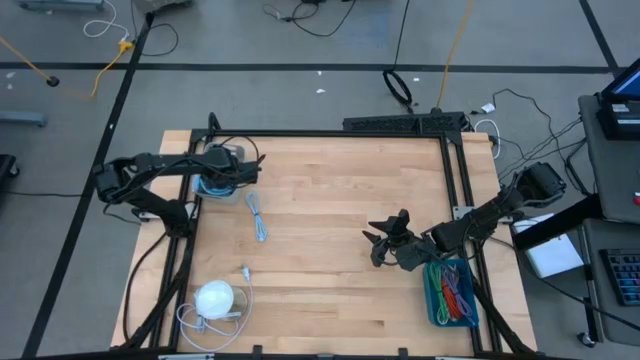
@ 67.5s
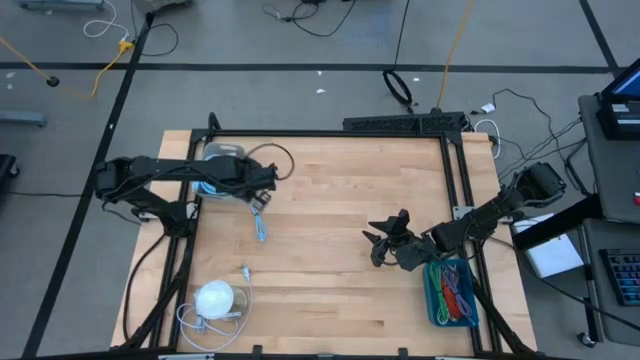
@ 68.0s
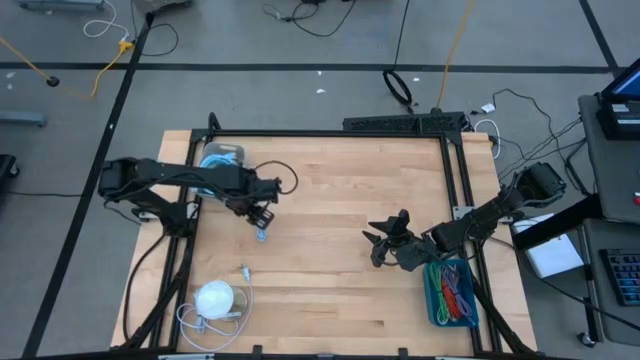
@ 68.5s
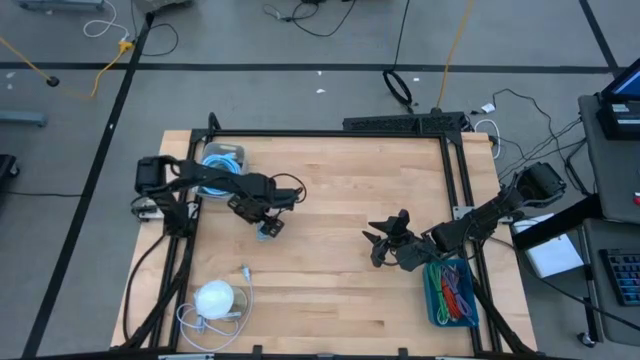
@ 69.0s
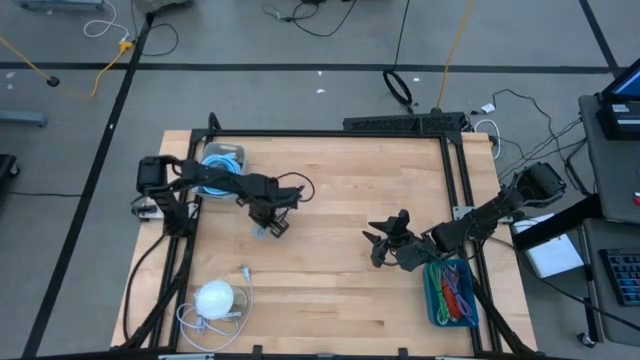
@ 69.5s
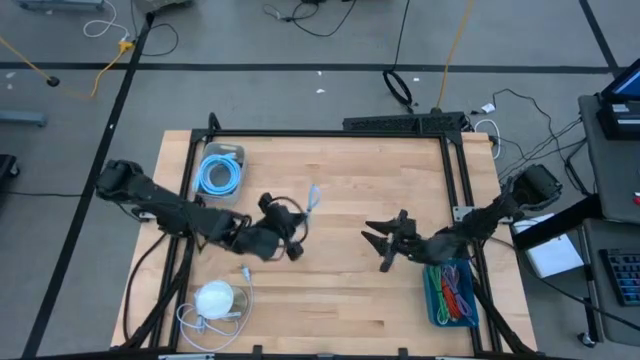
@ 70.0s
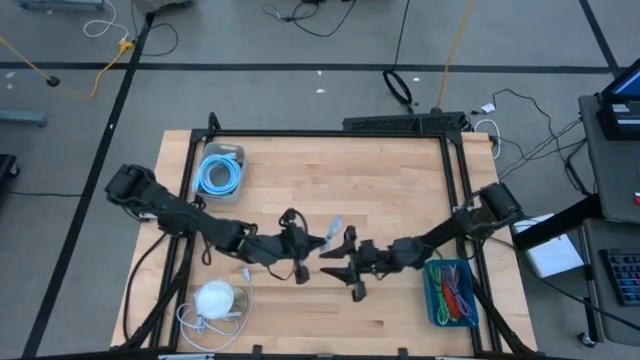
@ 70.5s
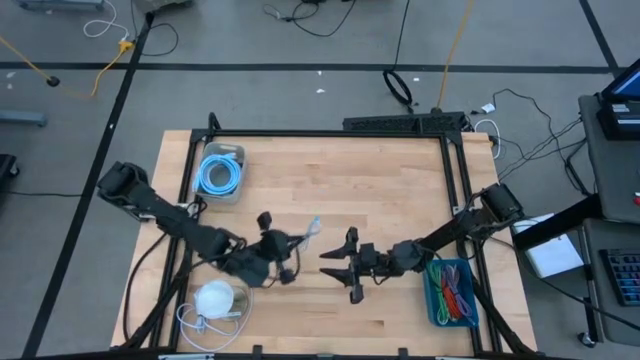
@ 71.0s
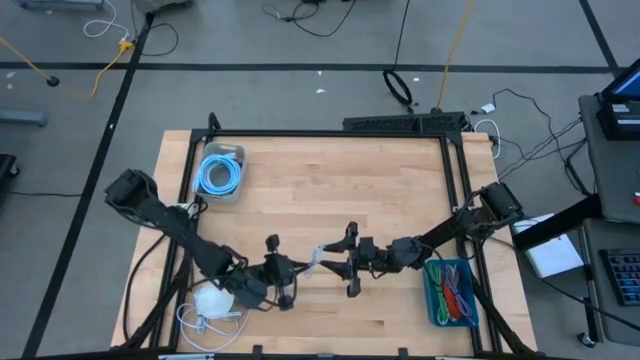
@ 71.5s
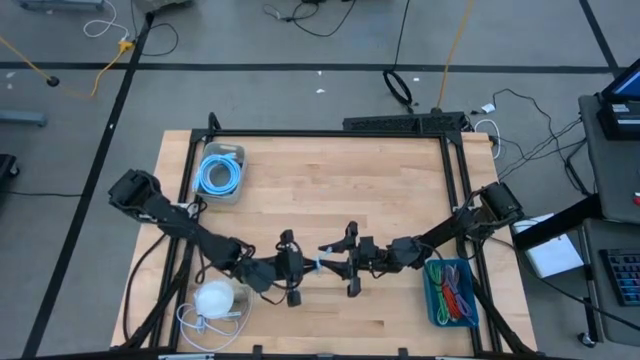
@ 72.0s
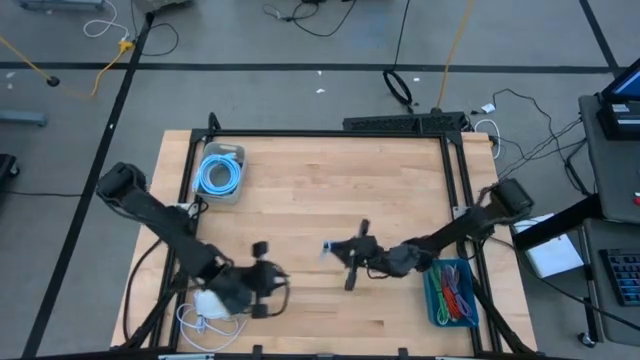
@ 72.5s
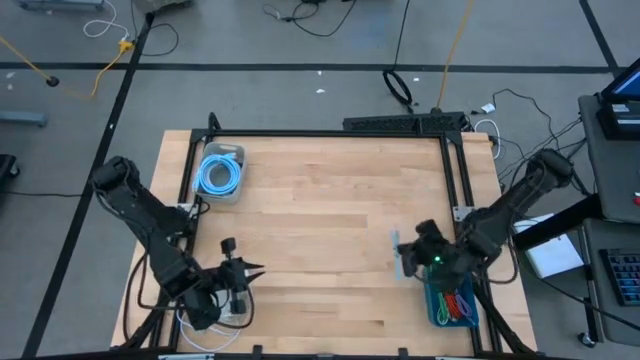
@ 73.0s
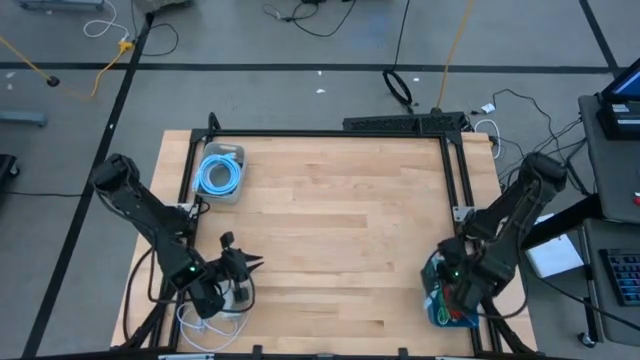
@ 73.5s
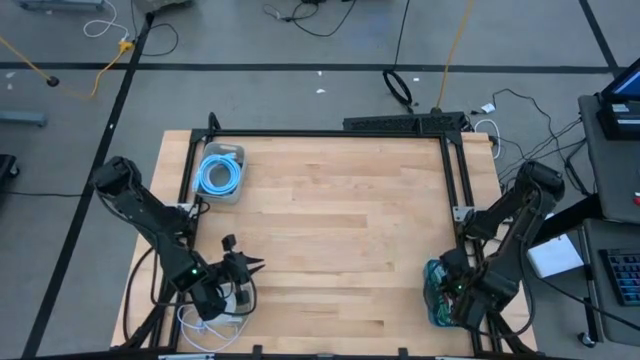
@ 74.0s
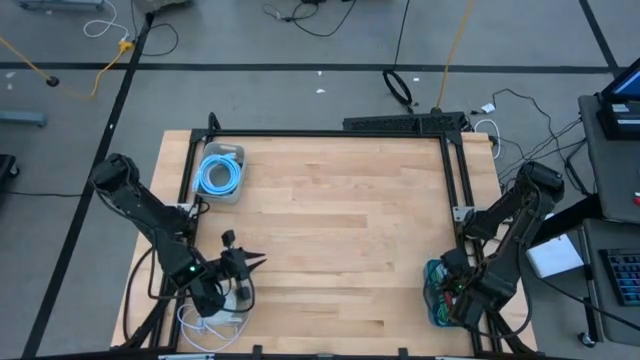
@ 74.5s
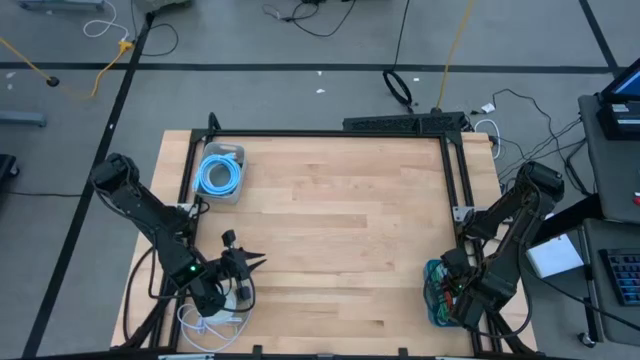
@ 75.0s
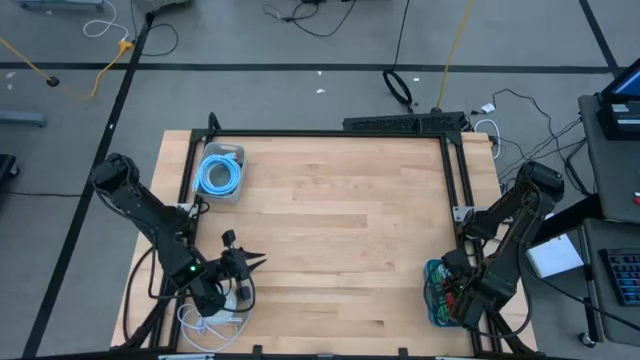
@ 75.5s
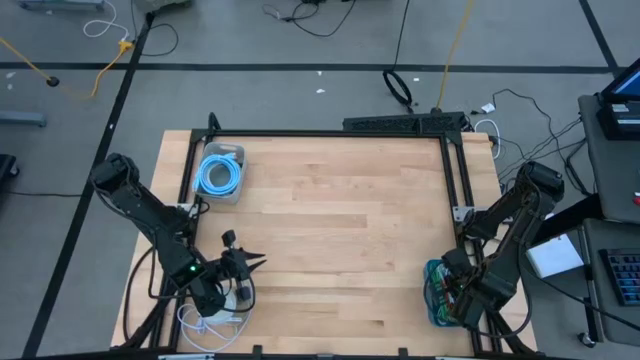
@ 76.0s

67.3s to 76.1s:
Task: Pick & Place USB Port
Put the blue USB cable into the blue basket

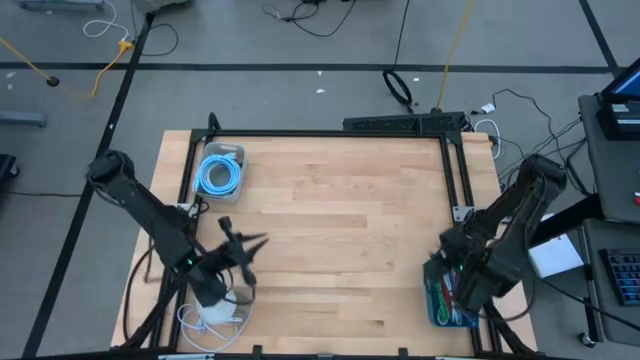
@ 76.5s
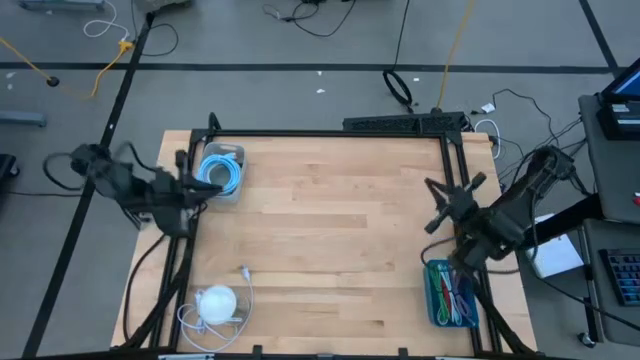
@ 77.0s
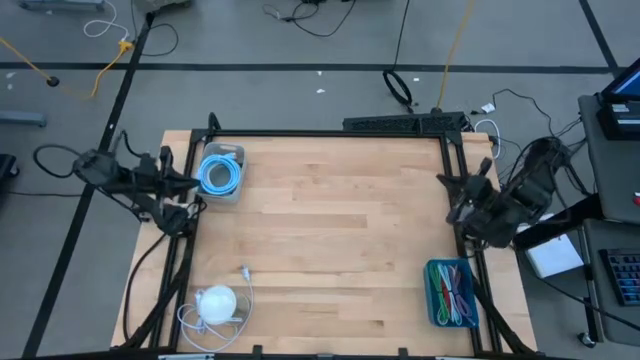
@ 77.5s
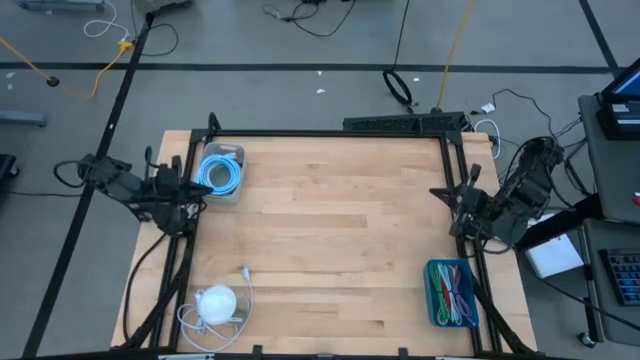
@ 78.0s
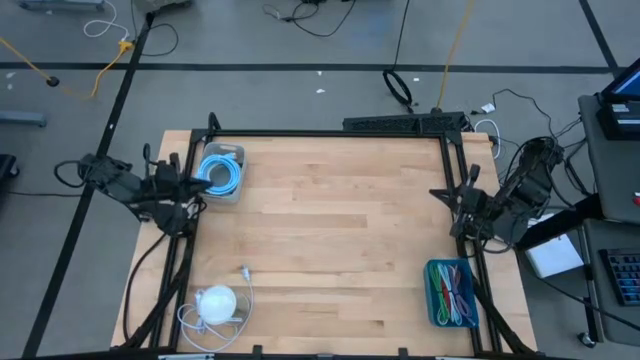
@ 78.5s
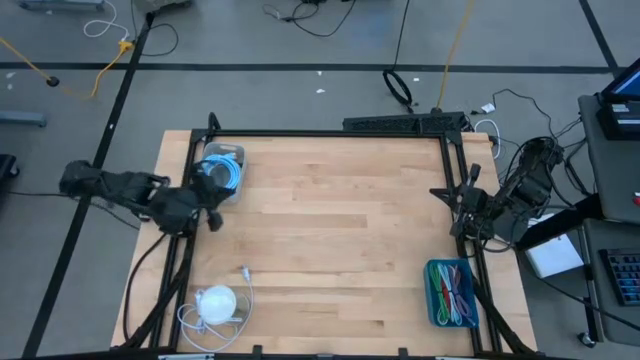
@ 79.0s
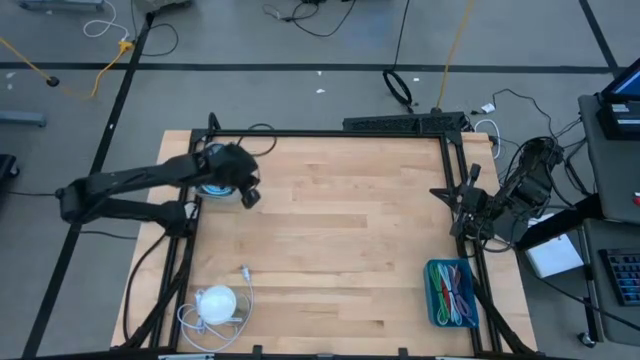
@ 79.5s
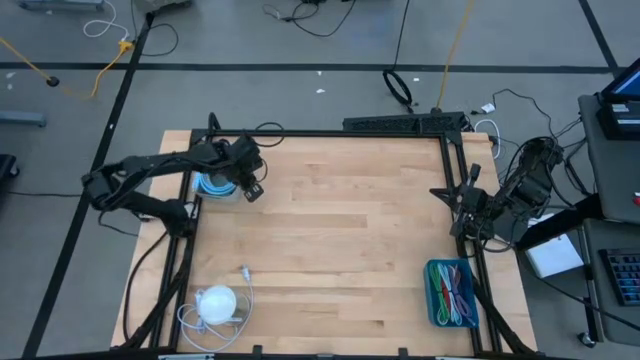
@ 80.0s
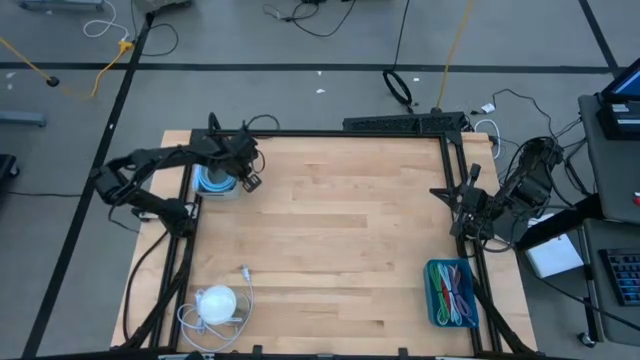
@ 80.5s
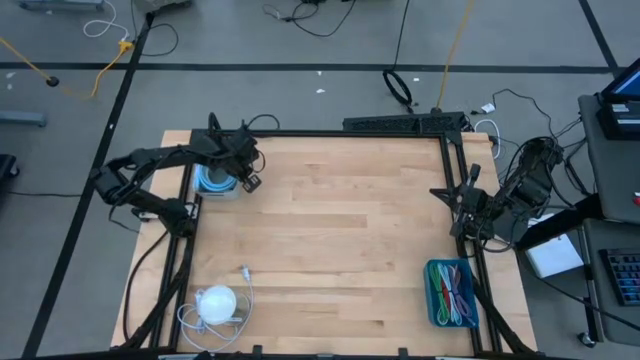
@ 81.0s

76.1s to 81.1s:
Adjust the gray basket

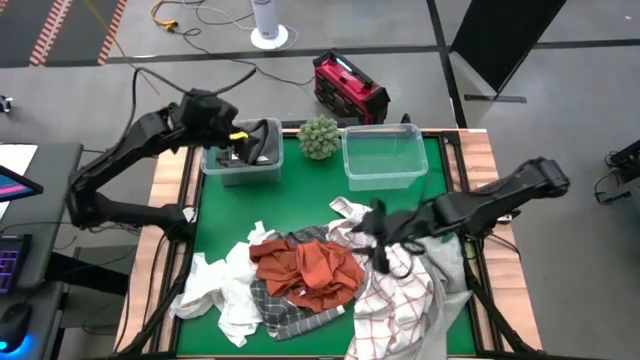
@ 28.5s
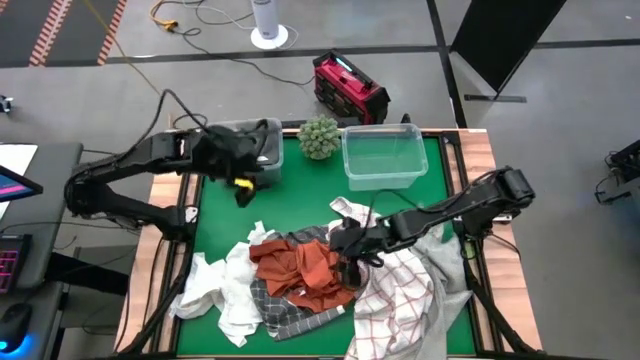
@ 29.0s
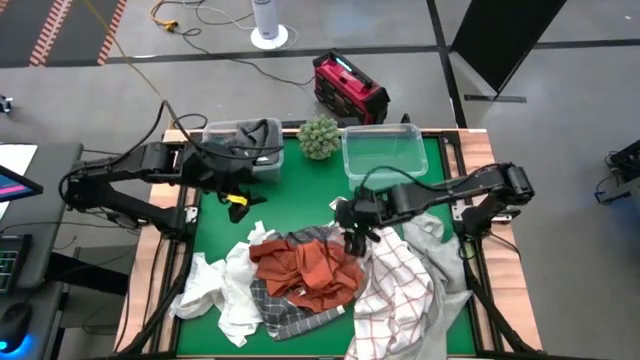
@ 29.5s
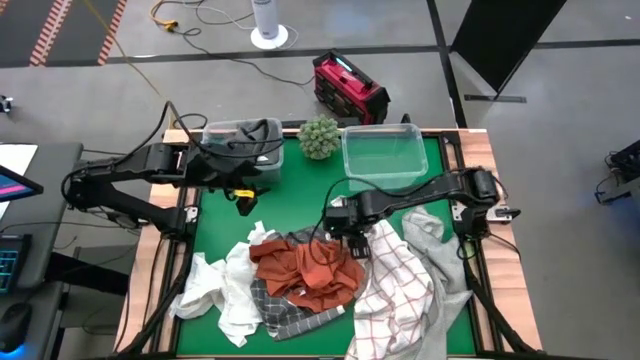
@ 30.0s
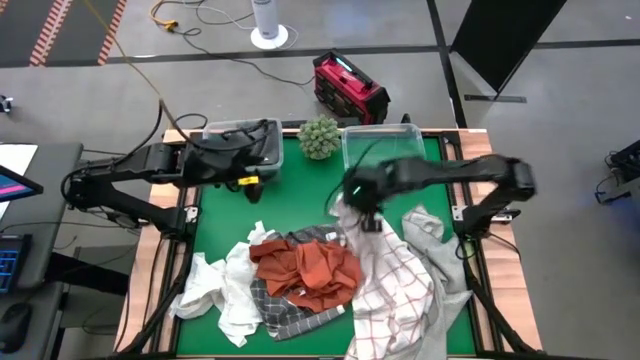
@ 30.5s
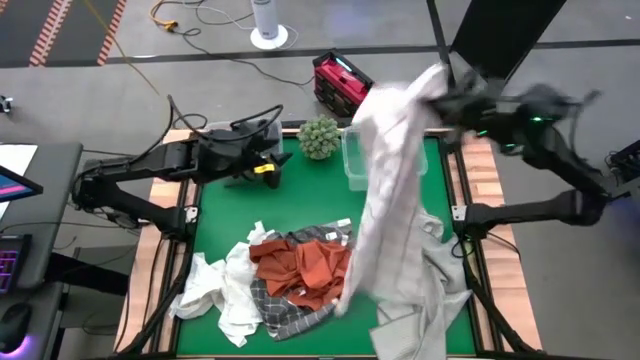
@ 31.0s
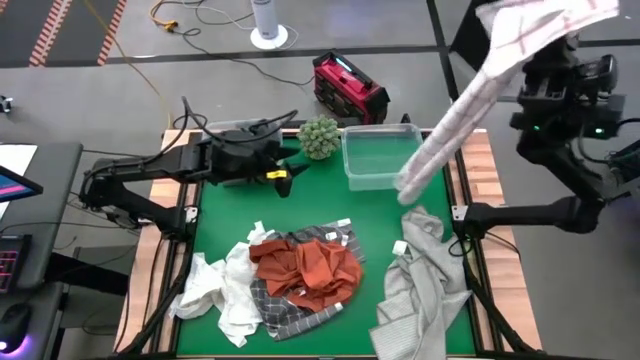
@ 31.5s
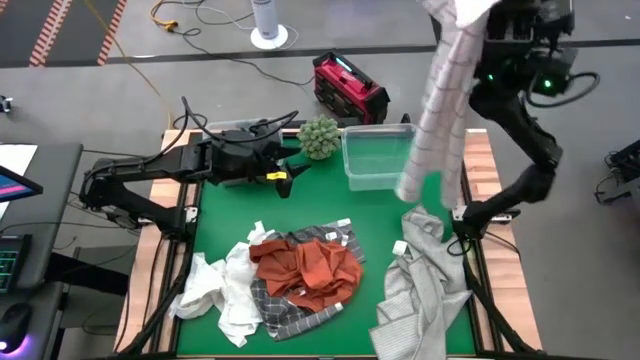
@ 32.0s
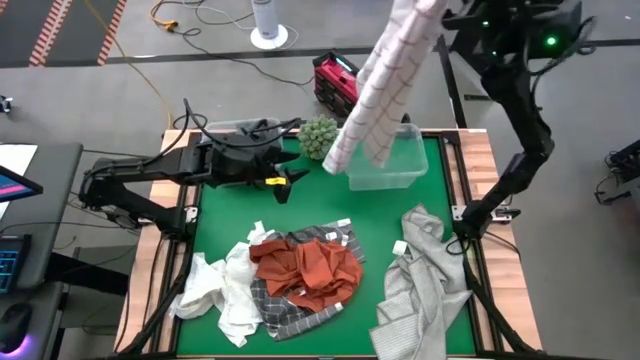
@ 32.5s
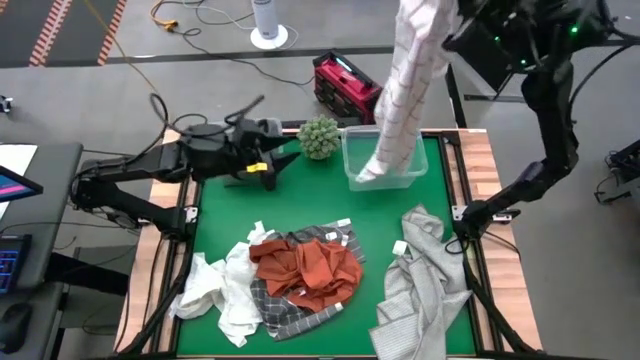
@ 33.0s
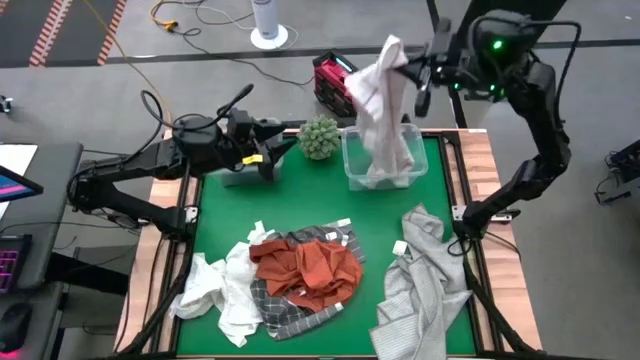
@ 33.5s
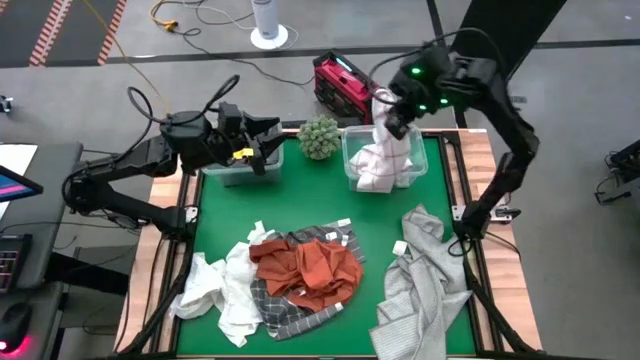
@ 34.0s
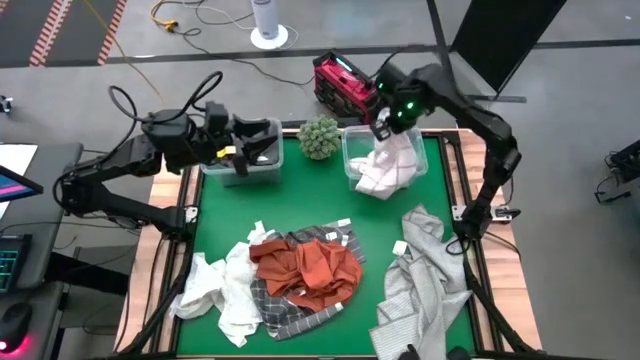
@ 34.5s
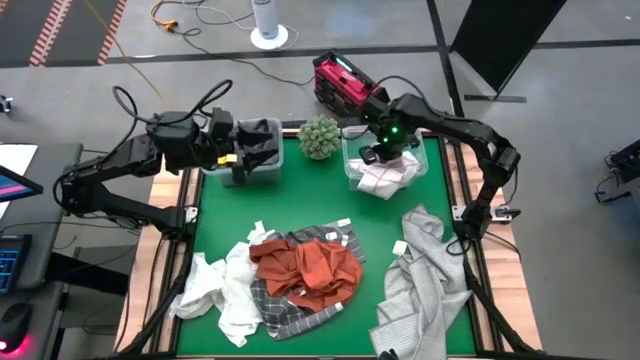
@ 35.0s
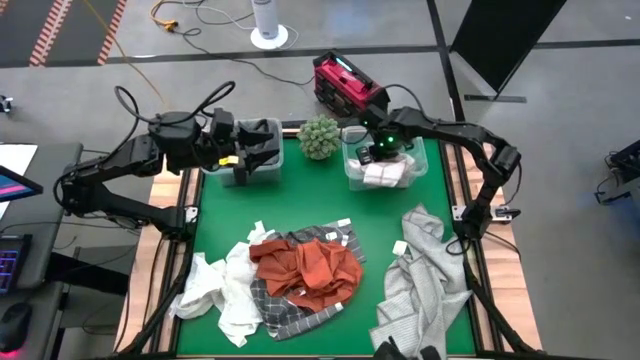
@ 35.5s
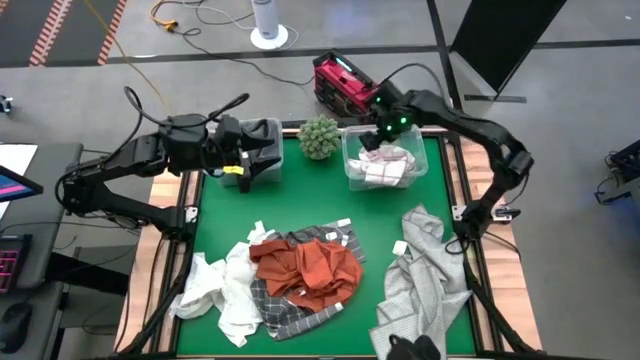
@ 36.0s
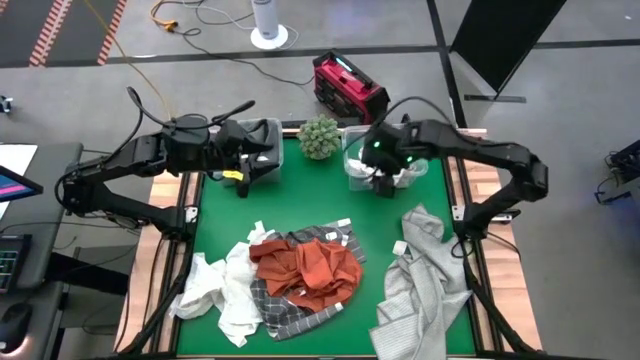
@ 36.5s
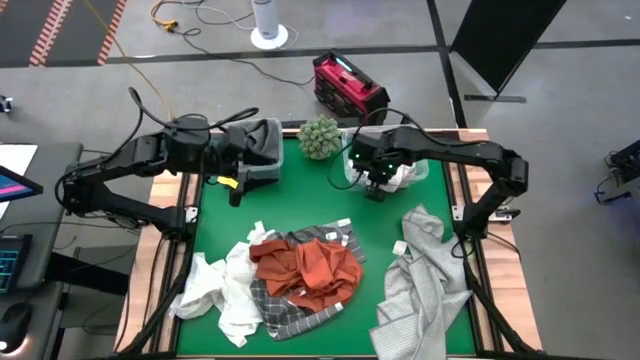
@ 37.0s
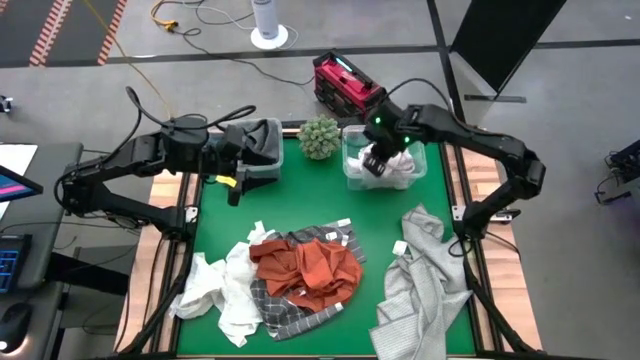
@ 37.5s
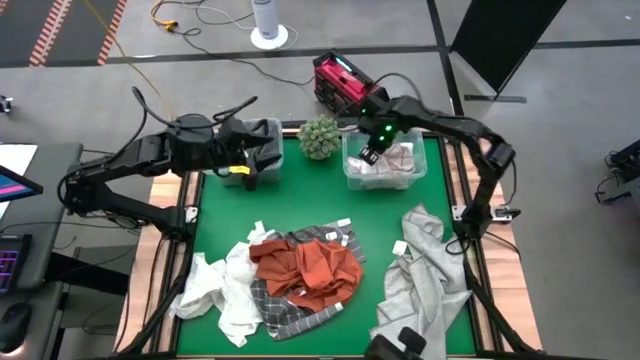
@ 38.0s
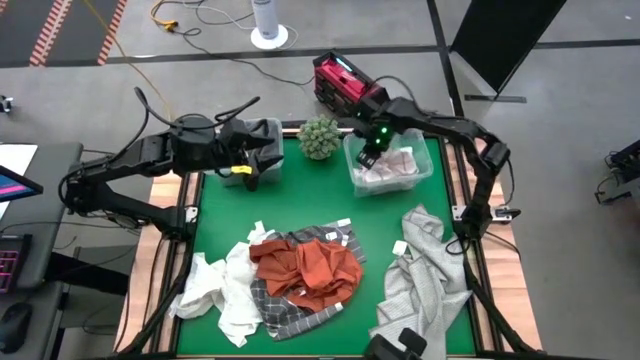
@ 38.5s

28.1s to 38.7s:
Task: Sort towels by color in basket
Put the white pattern towel into the right transparent bin
